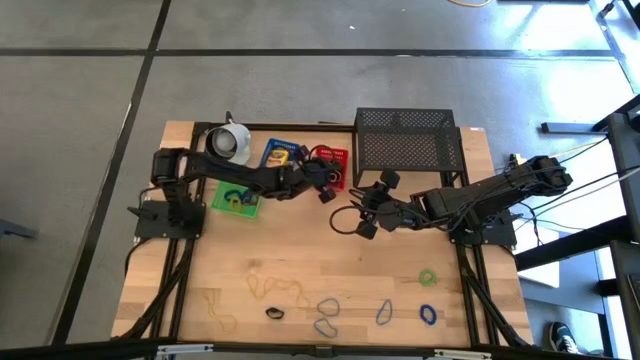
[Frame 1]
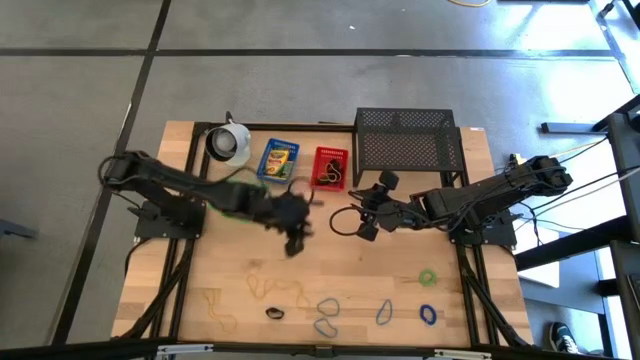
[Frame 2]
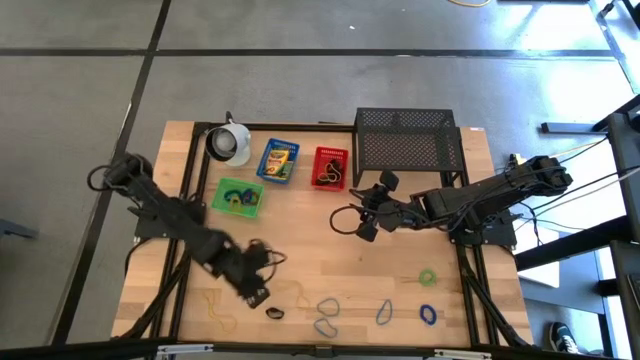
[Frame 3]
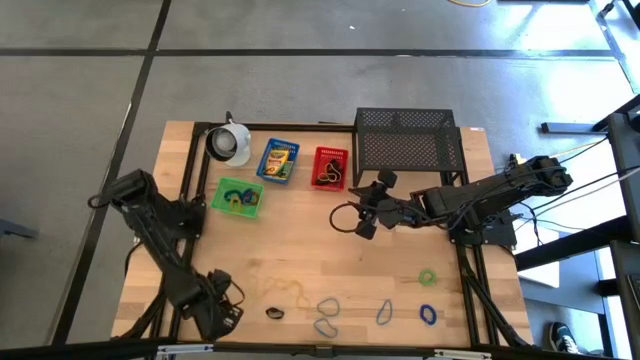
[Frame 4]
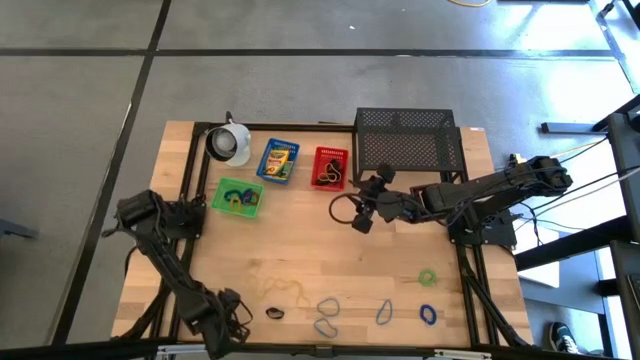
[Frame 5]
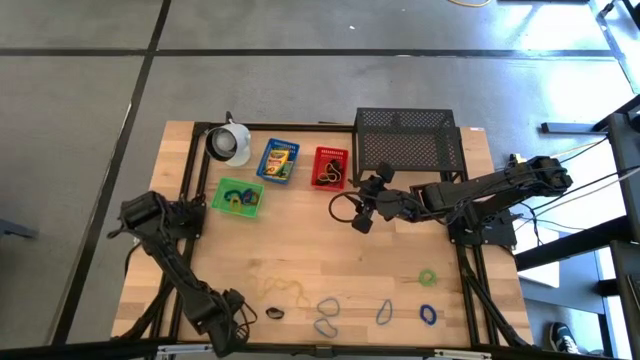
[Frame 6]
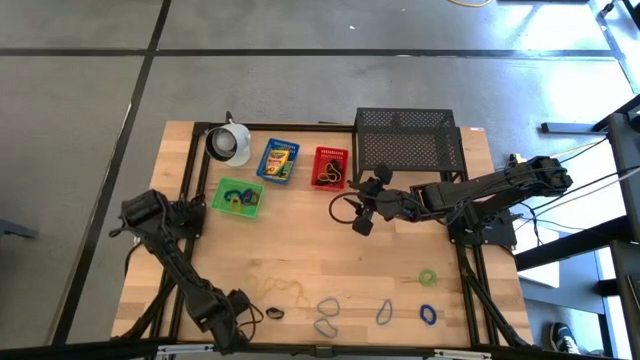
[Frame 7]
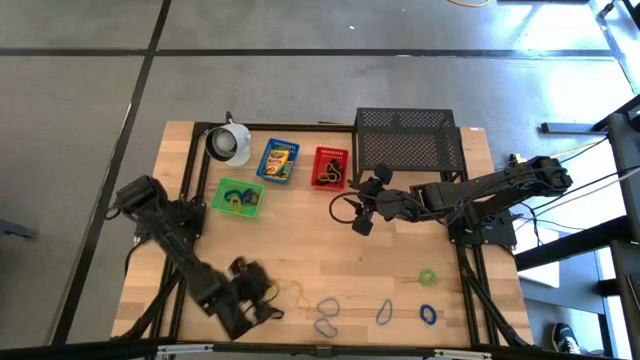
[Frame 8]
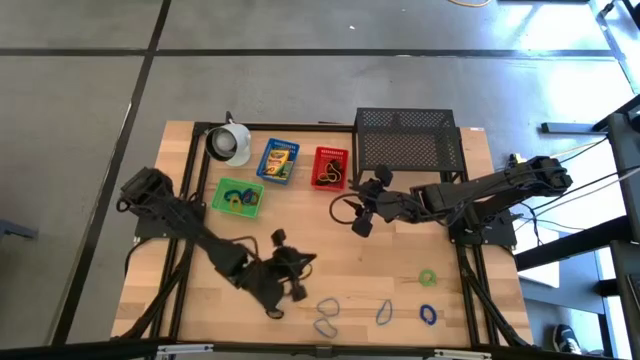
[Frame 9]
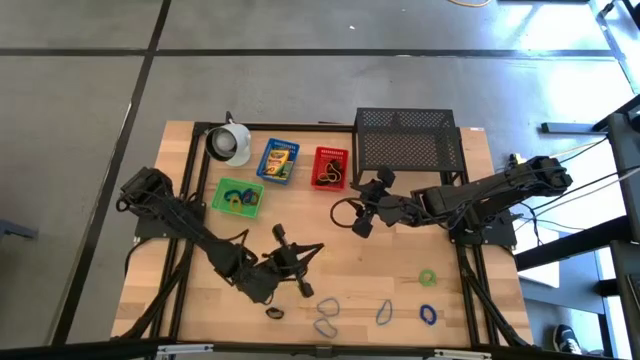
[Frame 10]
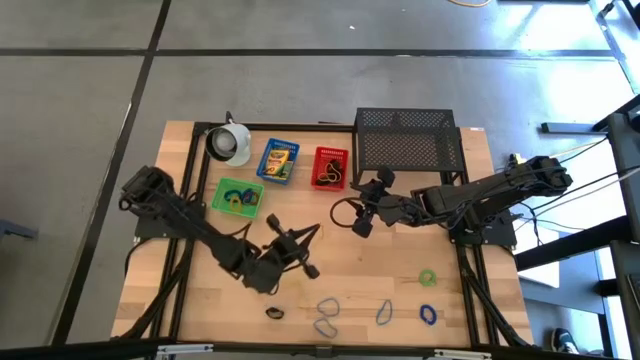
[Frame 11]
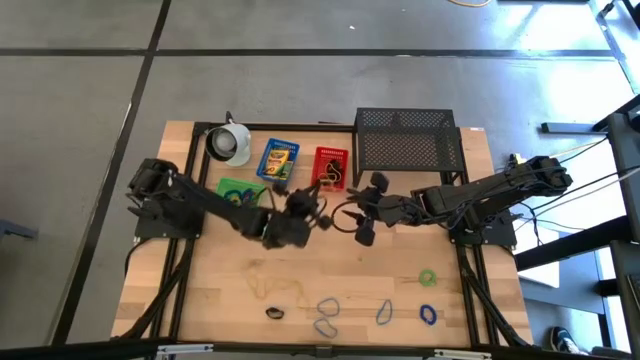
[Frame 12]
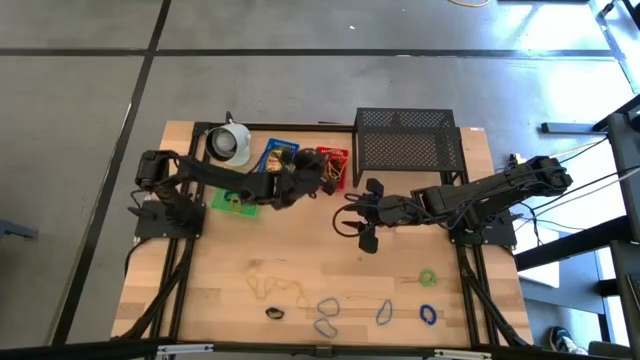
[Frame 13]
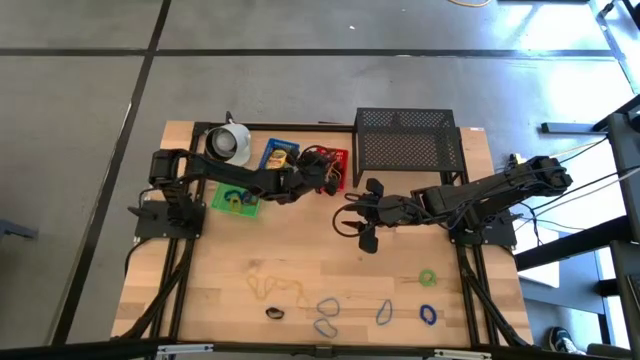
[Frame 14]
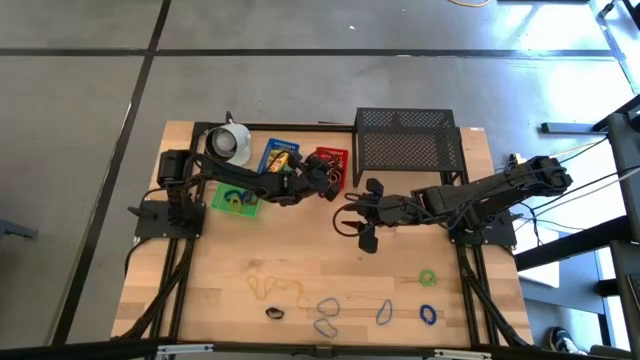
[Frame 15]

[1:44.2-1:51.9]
Task: Pick & Place Office Desk Supplies
Put the yellow rubber band into the red bin

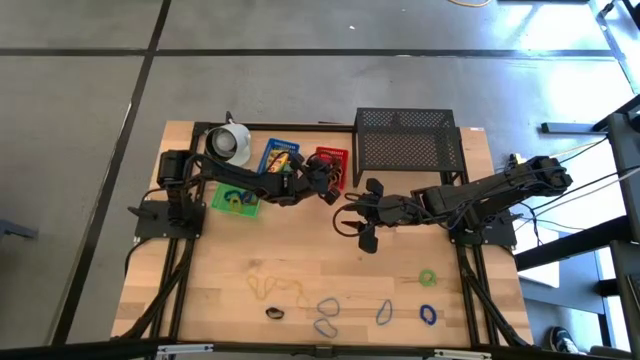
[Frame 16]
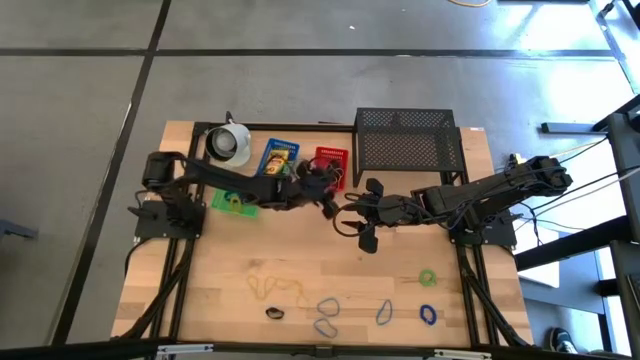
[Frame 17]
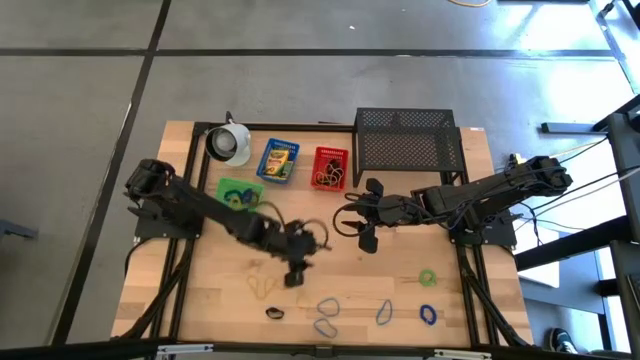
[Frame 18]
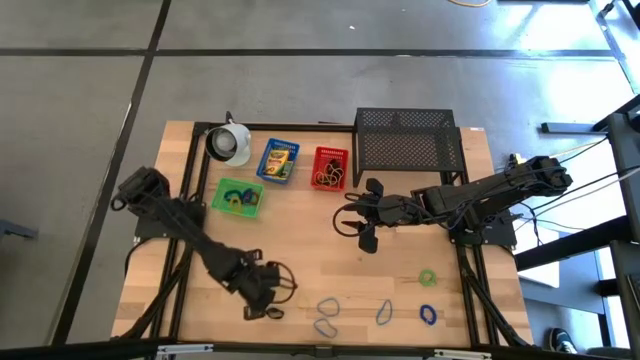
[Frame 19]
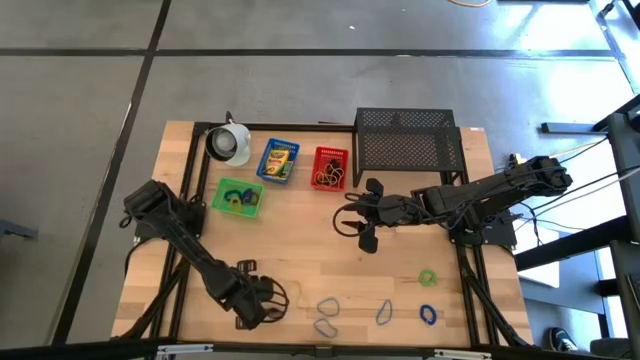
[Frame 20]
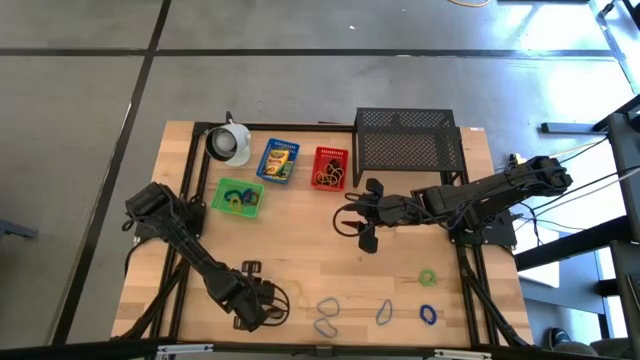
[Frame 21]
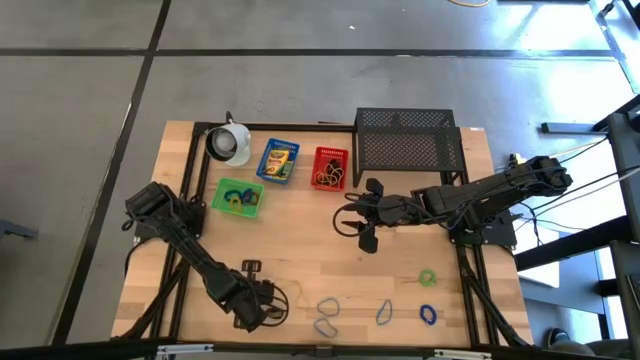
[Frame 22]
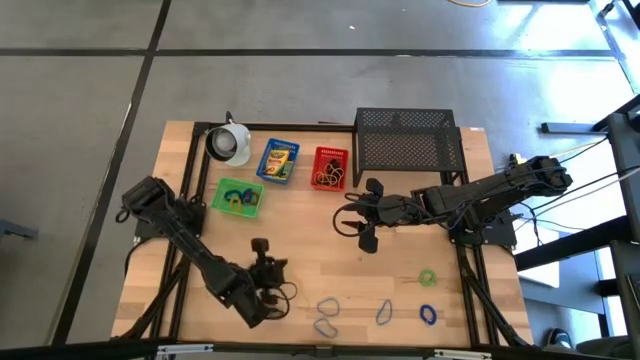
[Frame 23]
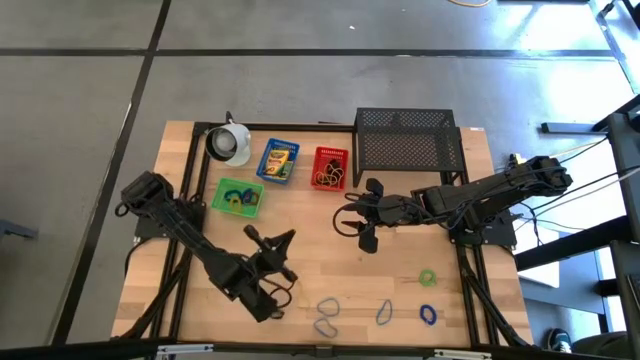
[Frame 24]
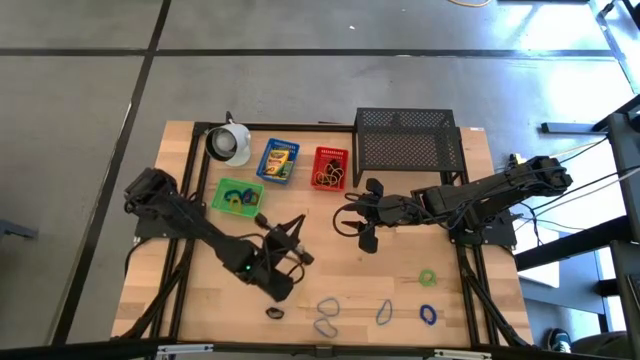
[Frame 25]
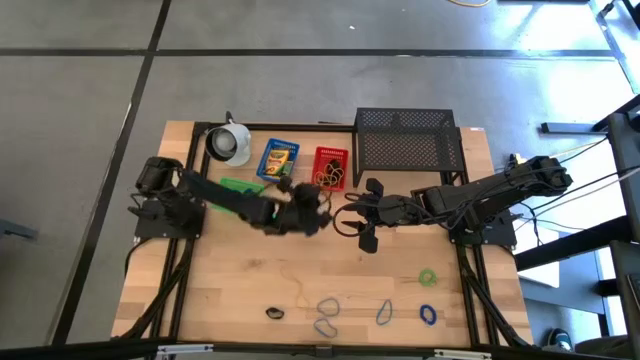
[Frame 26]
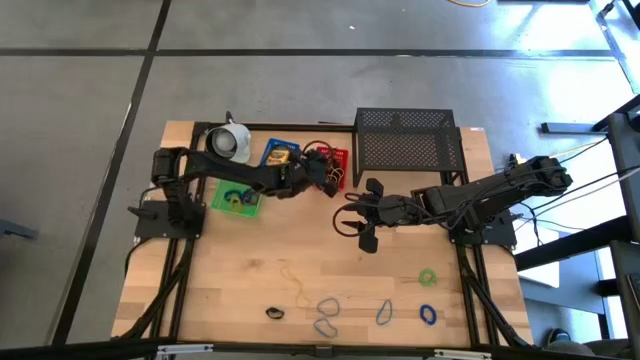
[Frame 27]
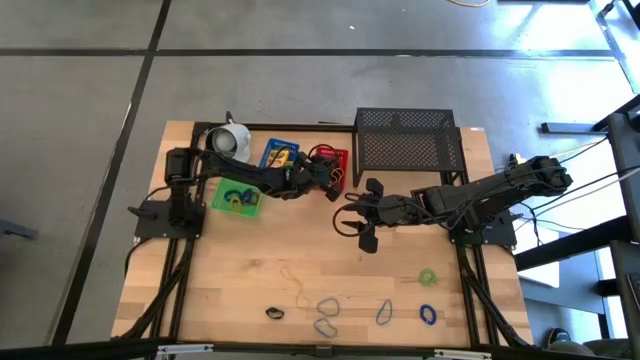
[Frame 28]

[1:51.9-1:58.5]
Put the yellow rubber band into the red bin

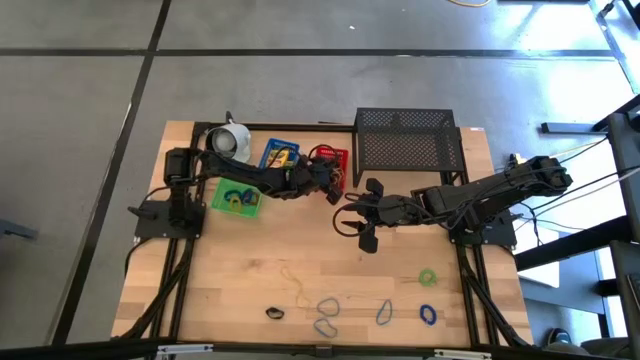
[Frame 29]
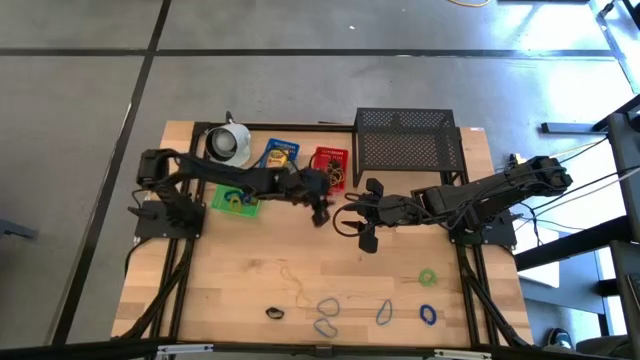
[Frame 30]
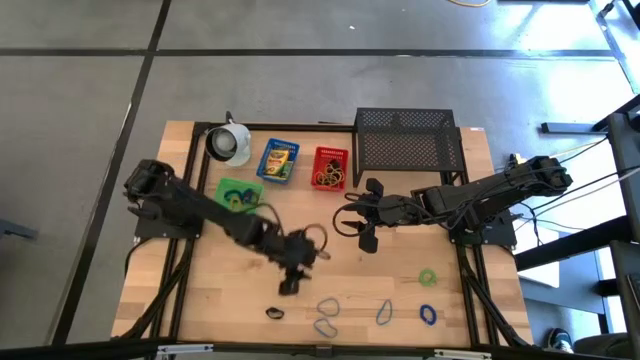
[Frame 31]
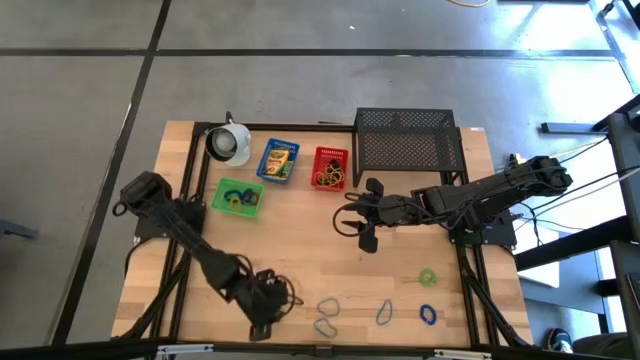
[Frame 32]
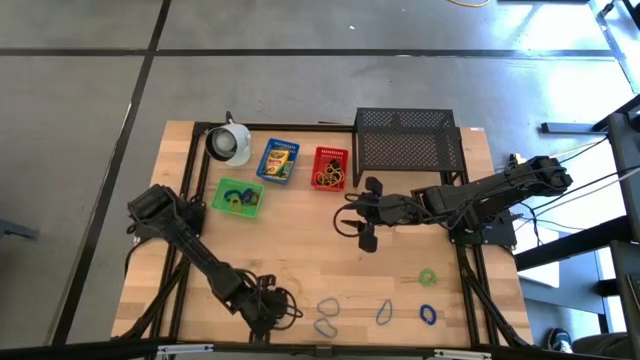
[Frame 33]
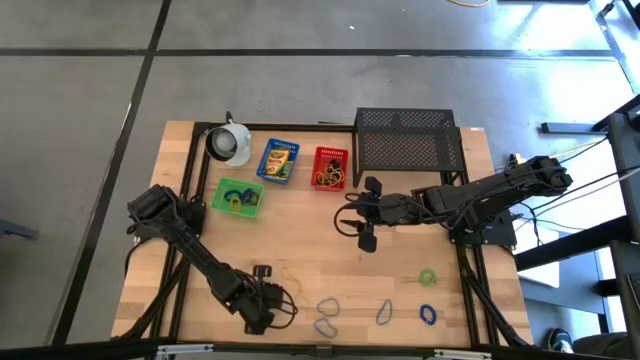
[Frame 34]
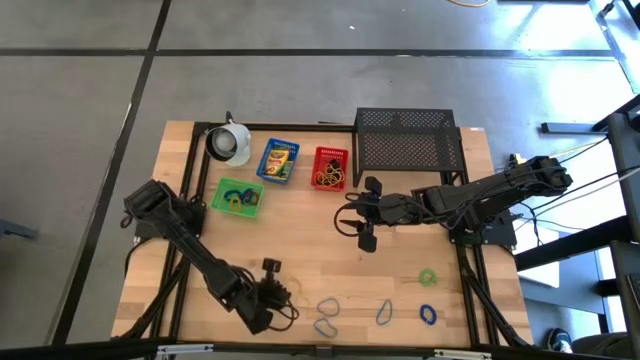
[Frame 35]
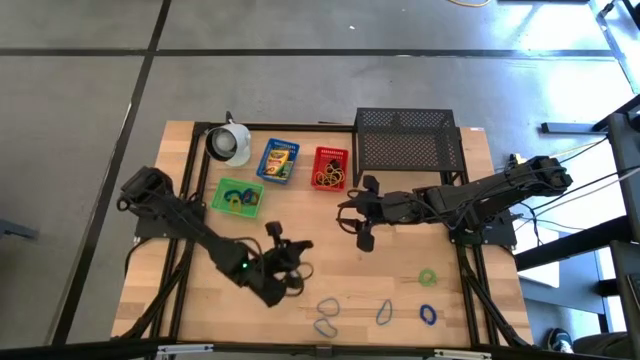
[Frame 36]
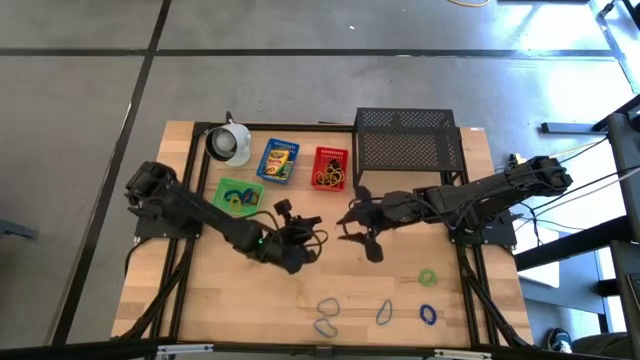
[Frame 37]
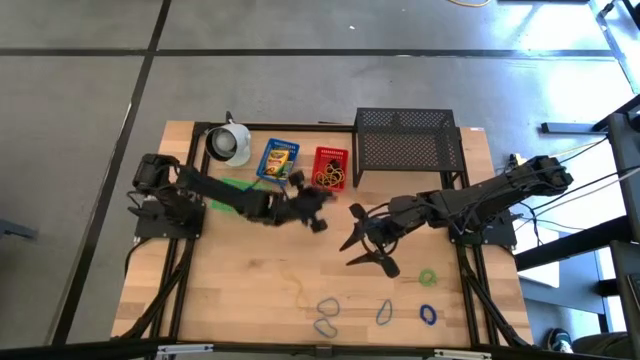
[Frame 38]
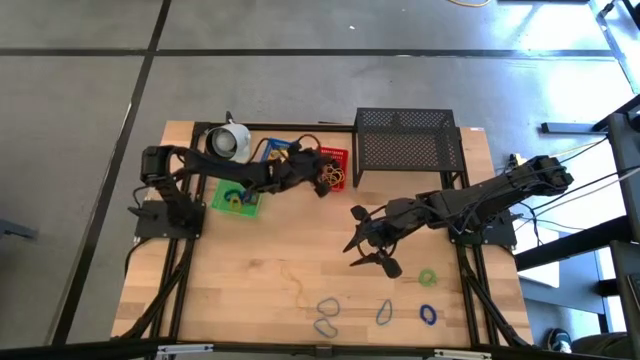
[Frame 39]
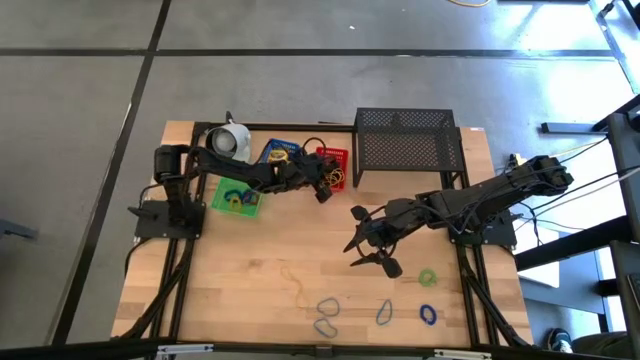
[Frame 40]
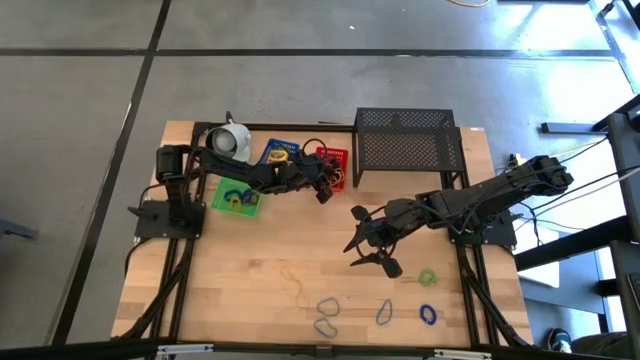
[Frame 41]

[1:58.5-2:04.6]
Put the black rubber band into the red bin

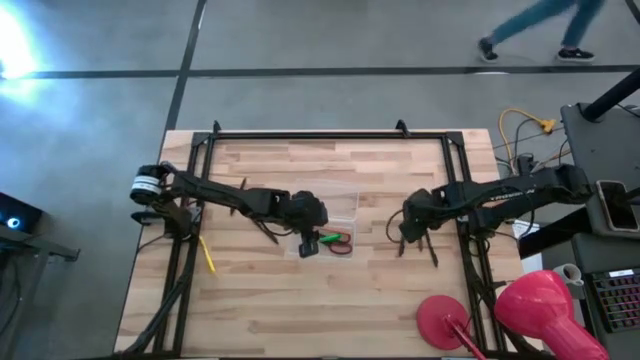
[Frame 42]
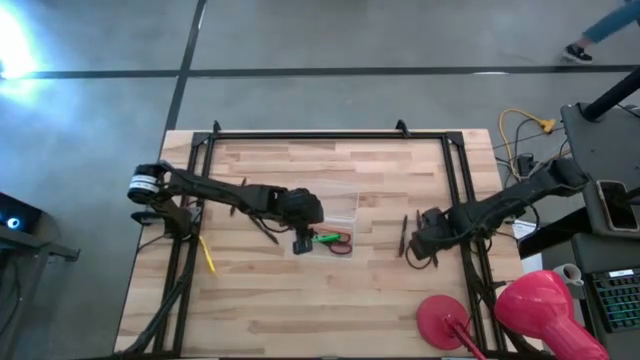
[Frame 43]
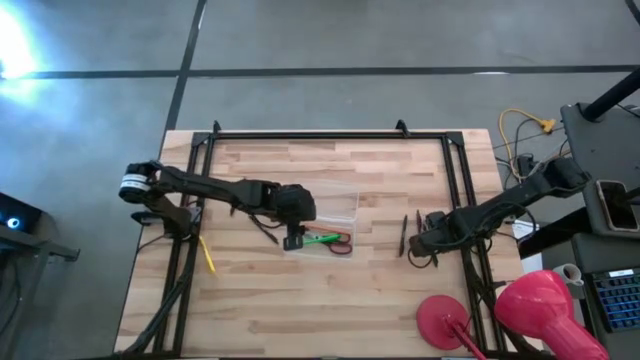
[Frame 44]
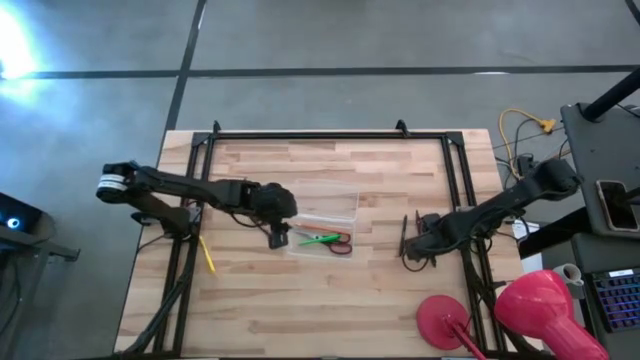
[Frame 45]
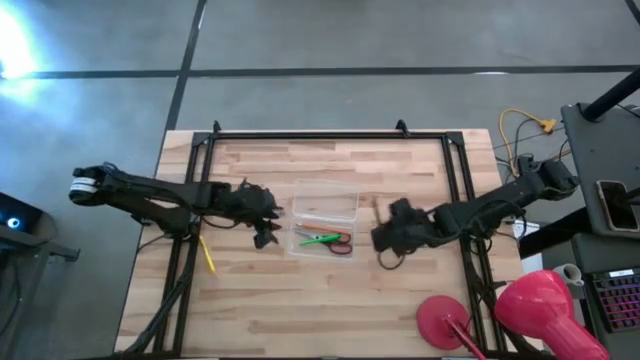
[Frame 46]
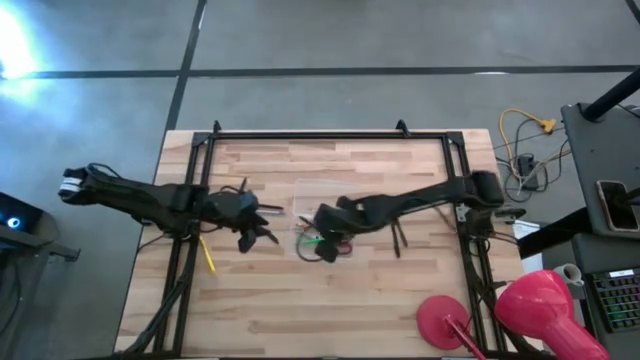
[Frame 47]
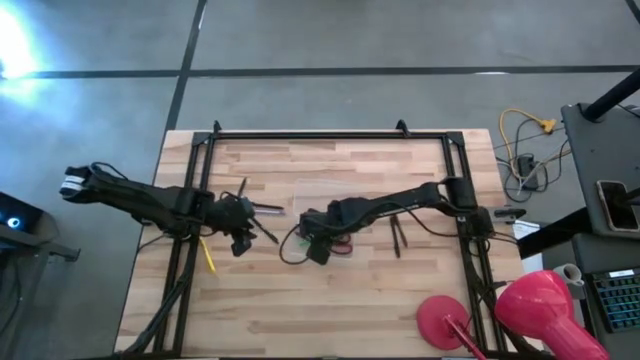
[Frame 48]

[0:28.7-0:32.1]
Task: Pick & place school supplies into a supply box
Put the black pen into the transparent supply box
